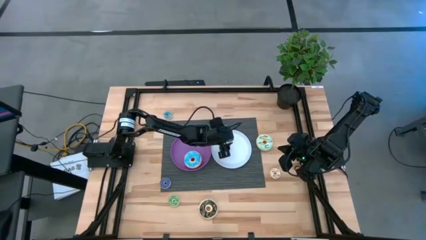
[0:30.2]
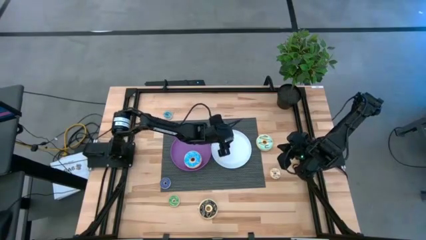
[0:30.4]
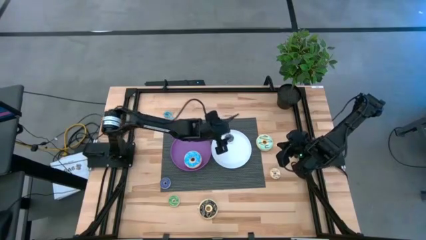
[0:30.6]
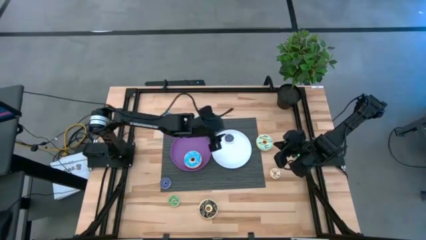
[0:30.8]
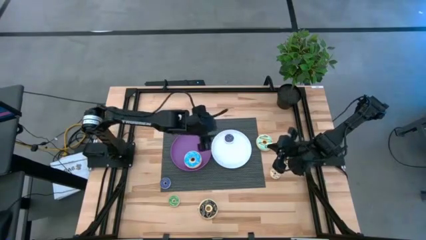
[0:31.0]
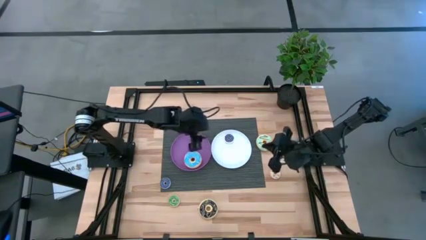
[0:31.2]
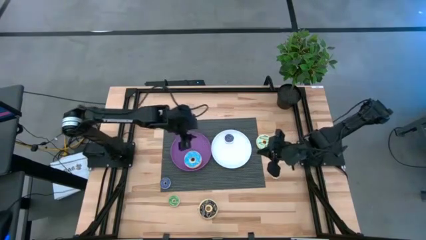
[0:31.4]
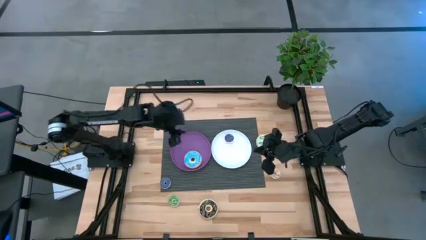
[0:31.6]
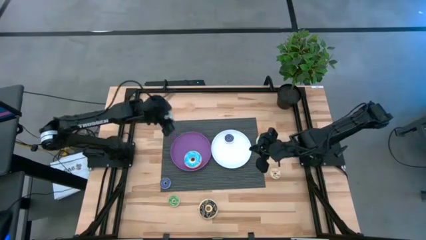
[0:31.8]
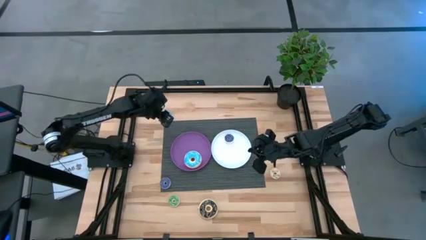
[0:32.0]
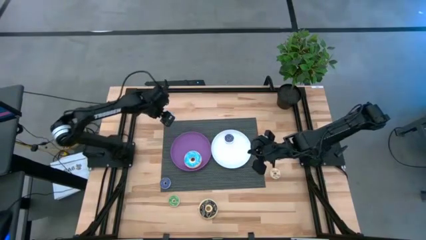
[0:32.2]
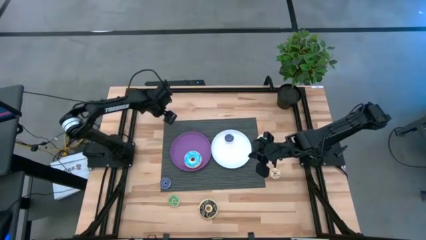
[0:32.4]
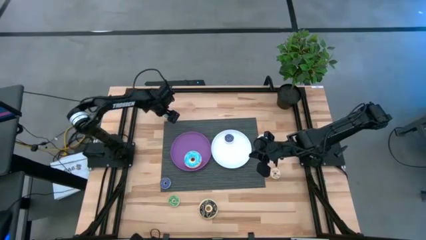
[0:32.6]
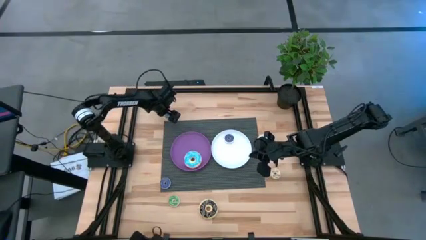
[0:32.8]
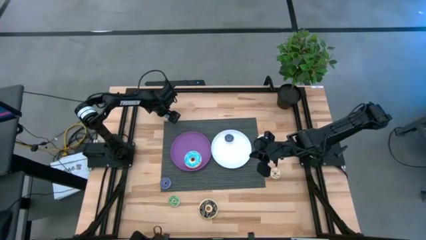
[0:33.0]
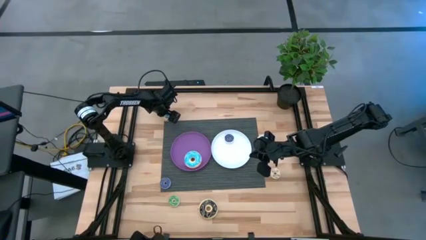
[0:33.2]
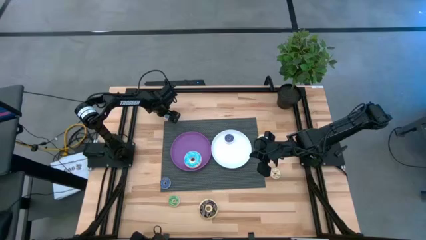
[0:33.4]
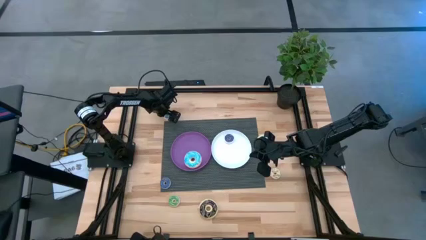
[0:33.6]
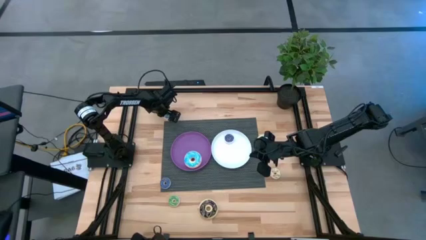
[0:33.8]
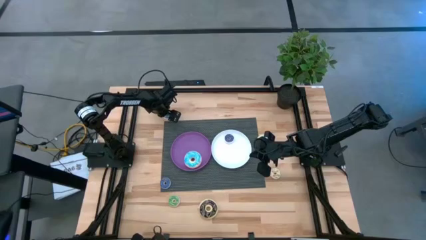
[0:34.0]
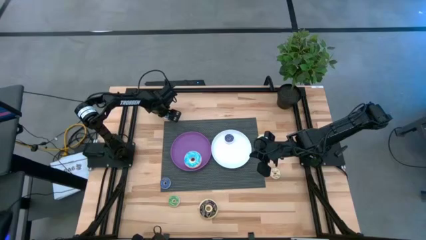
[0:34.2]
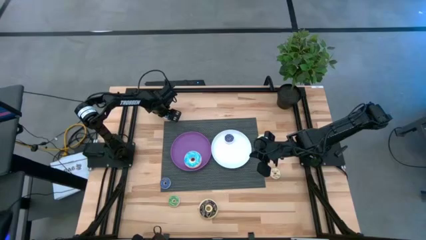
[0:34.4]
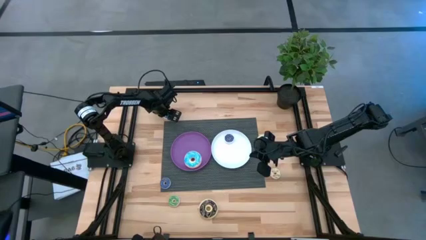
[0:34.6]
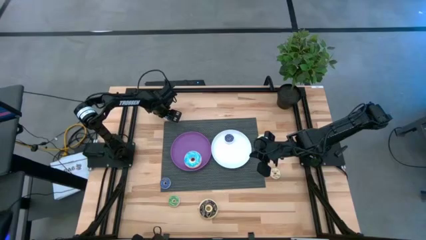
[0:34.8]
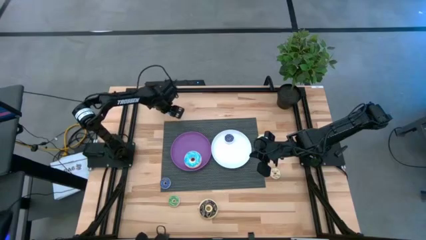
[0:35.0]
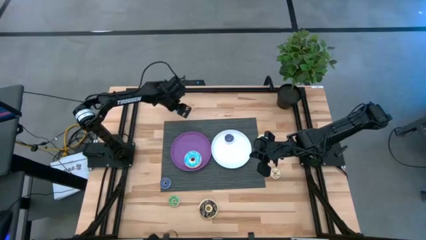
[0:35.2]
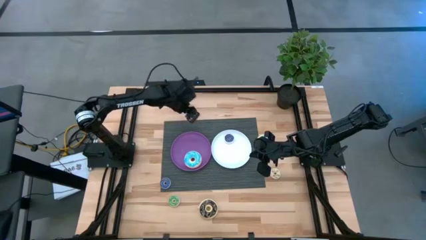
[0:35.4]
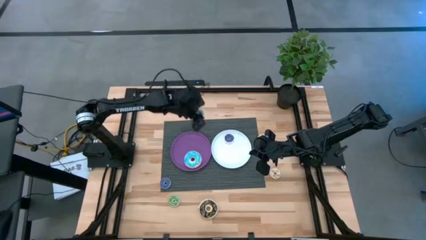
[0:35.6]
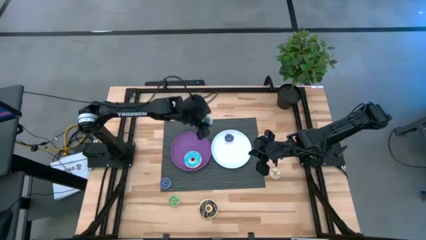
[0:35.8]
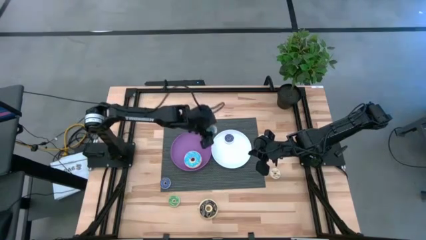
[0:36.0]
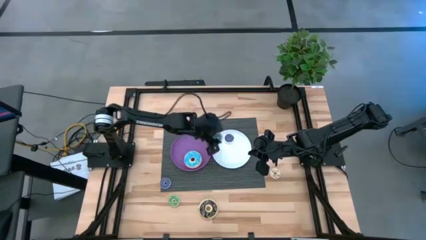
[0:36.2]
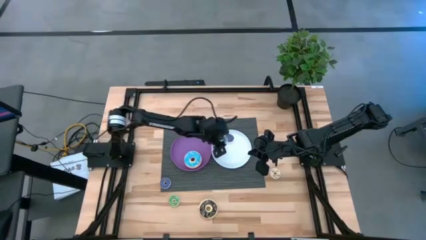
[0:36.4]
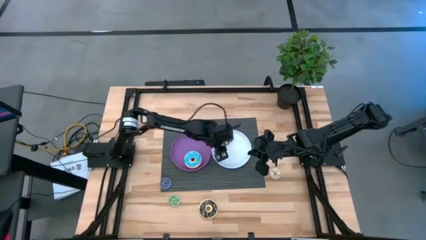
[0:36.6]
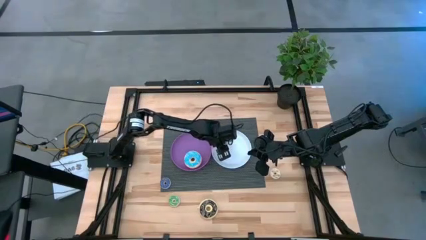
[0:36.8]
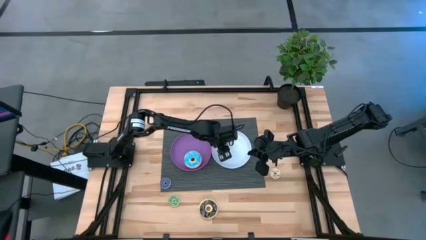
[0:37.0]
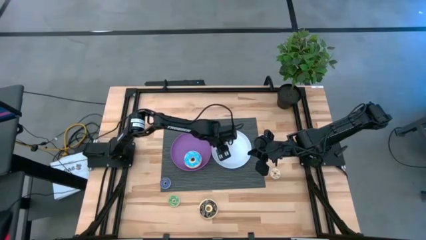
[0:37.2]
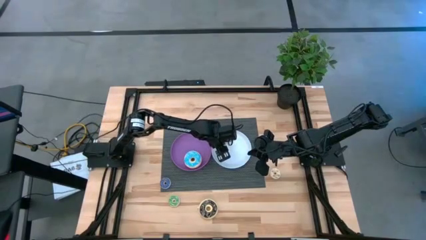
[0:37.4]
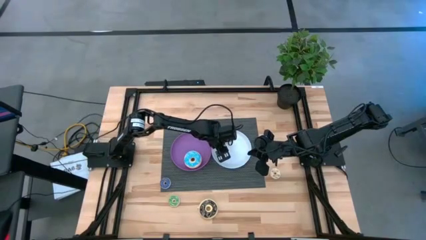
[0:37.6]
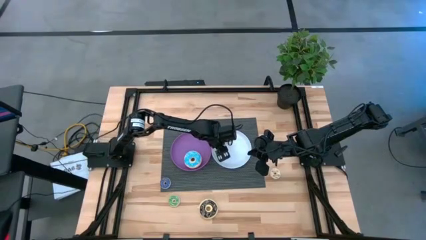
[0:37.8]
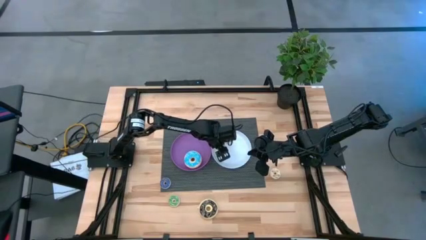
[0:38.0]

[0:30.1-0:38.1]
Task: Pick & Place donuts
Put the small blue donut on the white plate

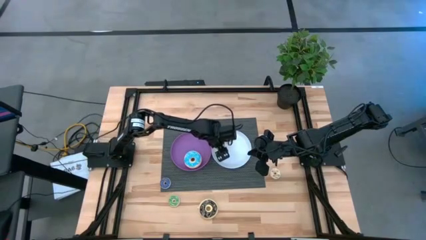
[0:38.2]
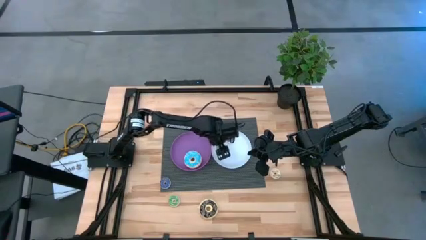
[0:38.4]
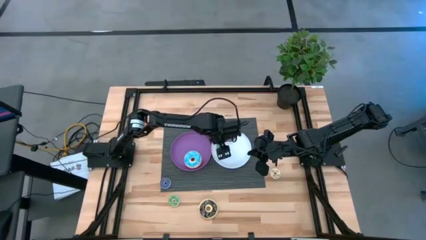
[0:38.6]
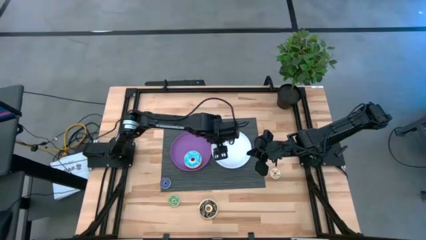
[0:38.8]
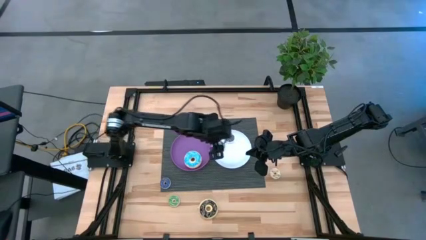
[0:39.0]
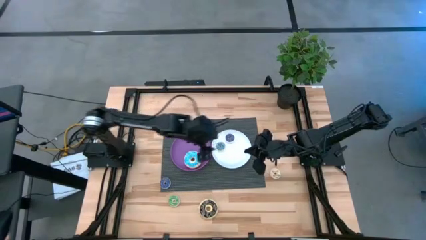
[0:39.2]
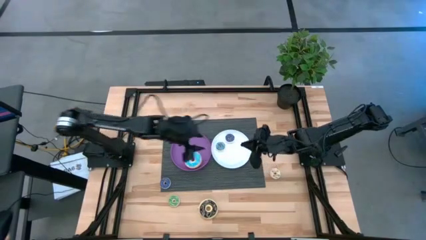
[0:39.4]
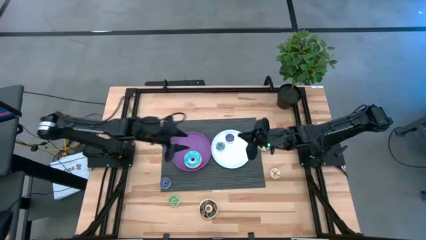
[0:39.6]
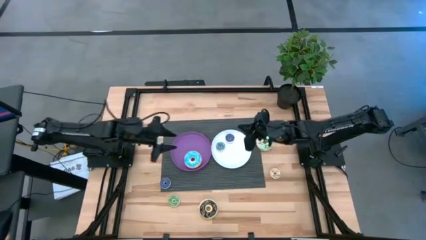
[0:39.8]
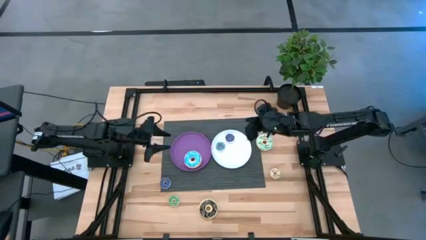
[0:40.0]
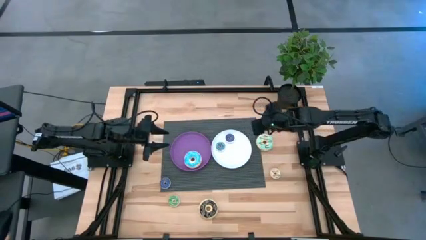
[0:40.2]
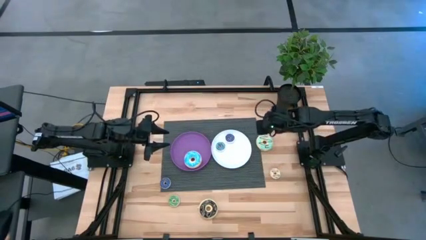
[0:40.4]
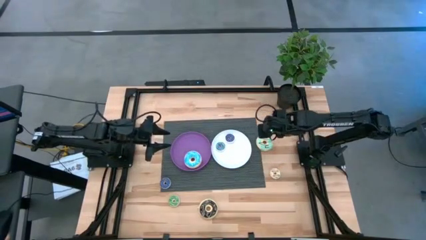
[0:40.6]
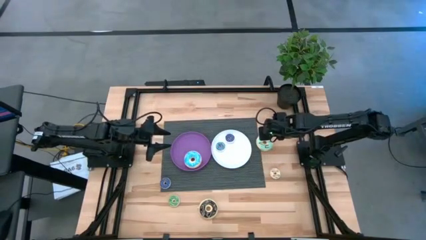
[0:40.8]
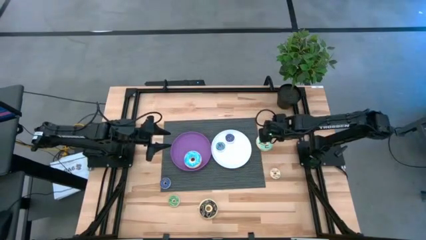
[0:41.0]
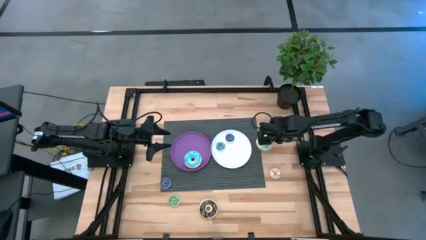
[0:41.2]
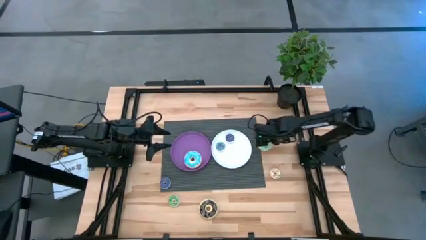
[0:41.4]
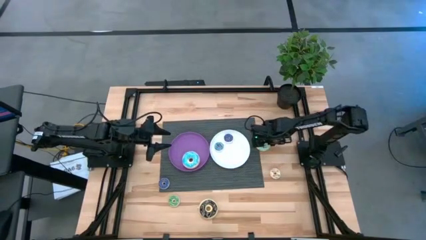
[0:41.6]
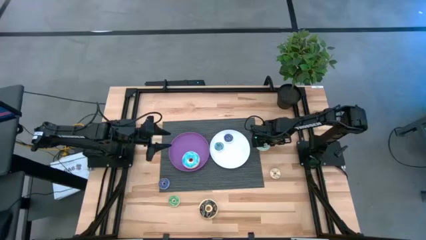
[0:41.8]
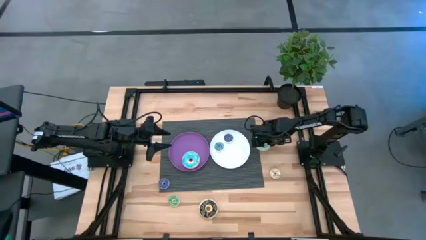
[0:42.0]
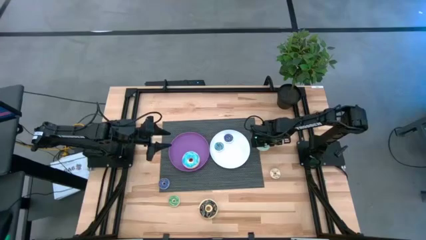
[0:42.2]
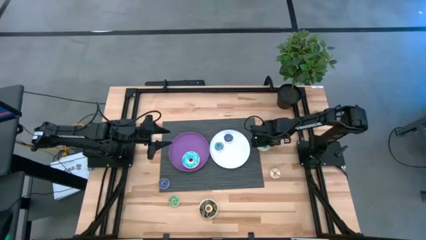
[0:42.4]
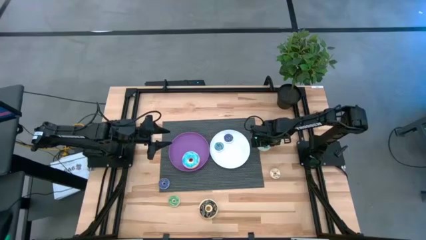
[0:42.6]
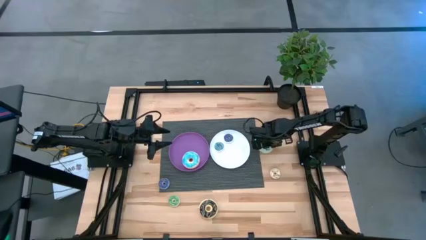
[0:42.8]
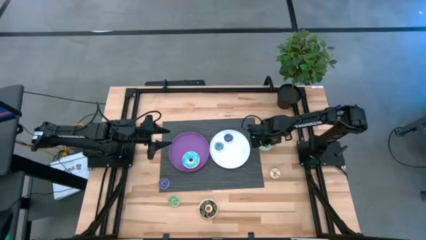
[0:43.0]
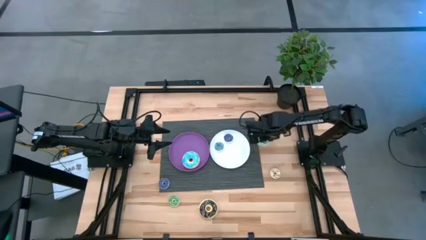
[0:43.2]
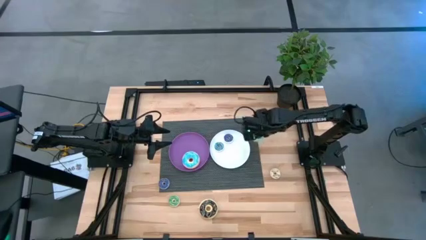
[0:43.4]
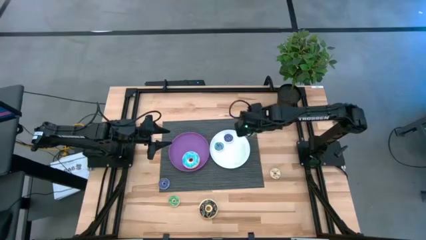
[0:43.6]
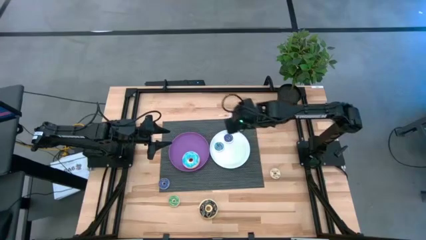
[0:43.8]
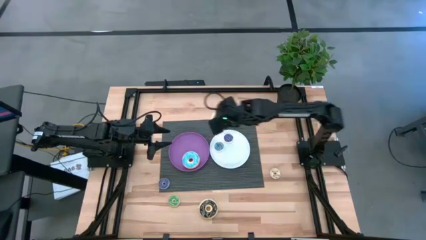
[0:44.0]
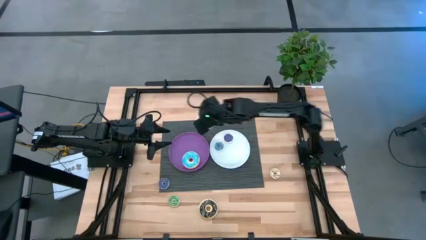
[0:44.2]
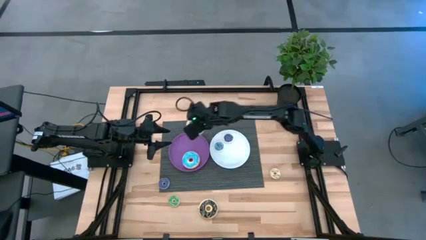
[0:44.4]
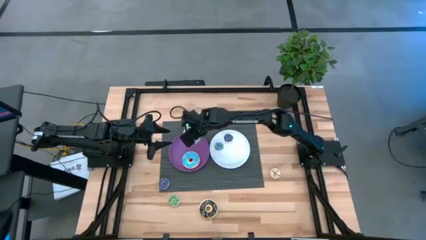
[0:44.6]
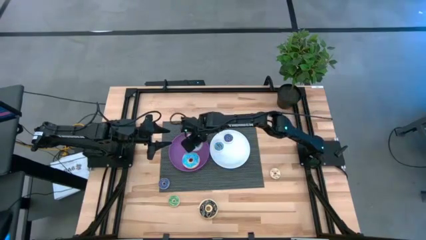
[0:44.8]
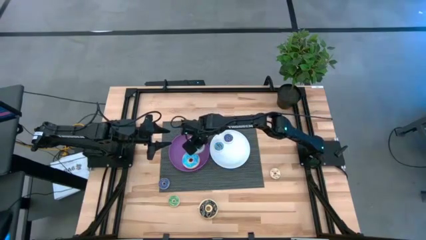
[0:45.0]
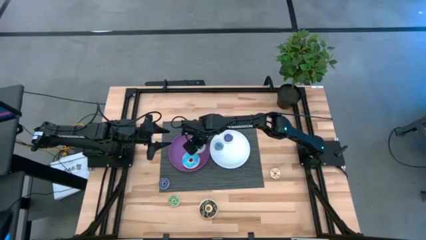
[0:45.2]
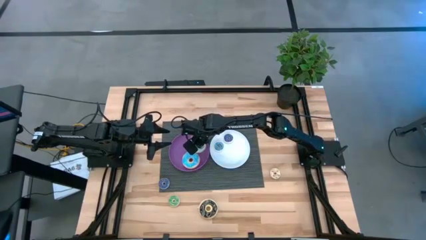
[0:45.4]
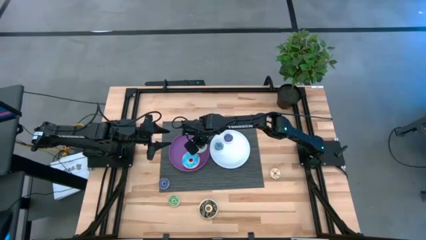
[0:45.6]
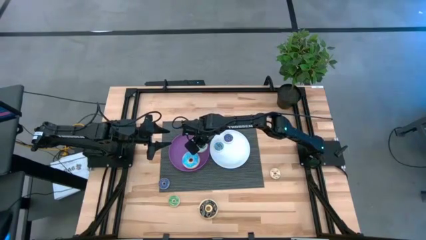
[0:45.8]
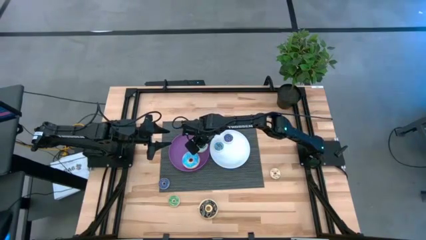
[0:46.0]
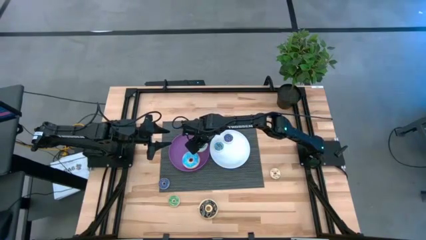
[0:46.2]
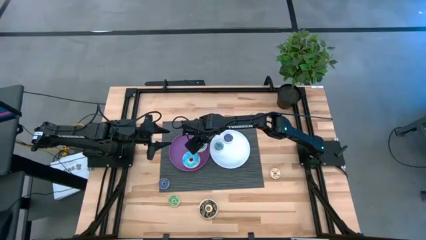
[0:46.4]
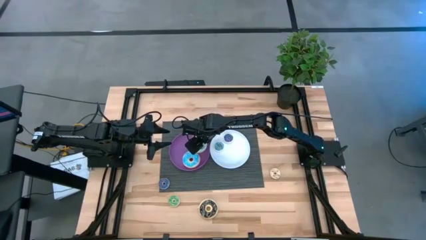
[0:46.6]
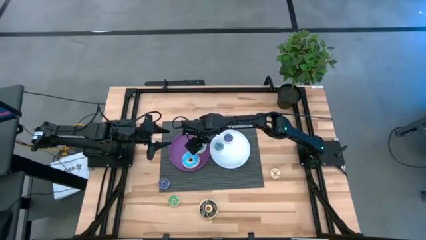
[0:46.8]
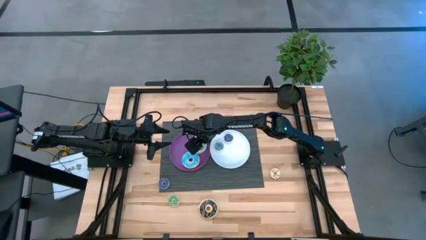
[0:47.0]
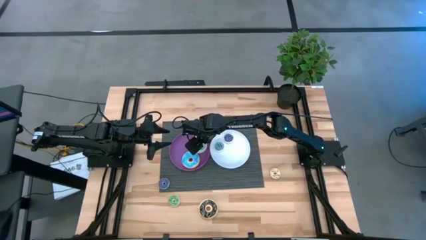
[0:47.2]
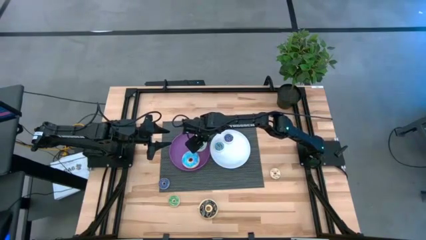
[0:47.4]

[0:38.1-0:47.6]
Put the large light green donut on the purple plate
